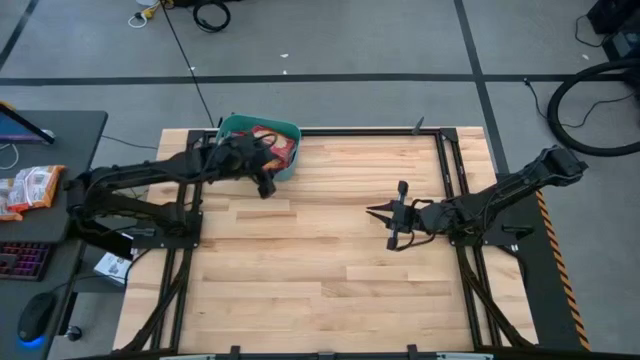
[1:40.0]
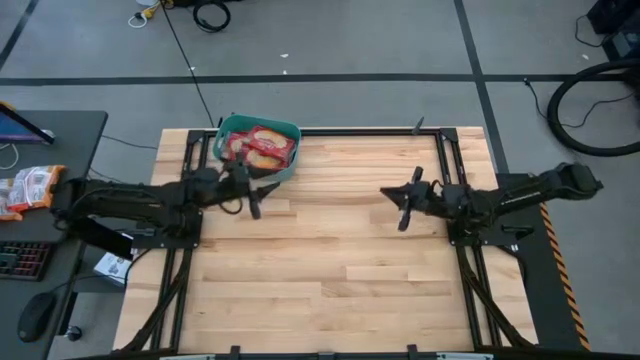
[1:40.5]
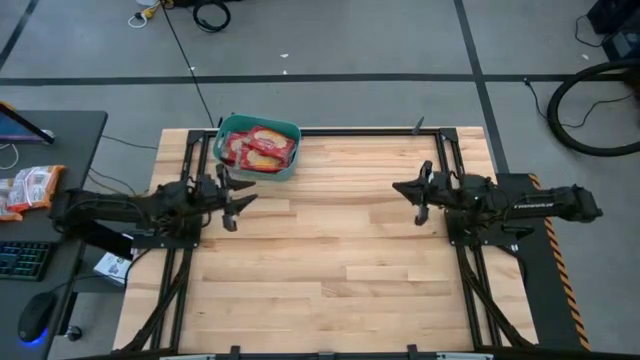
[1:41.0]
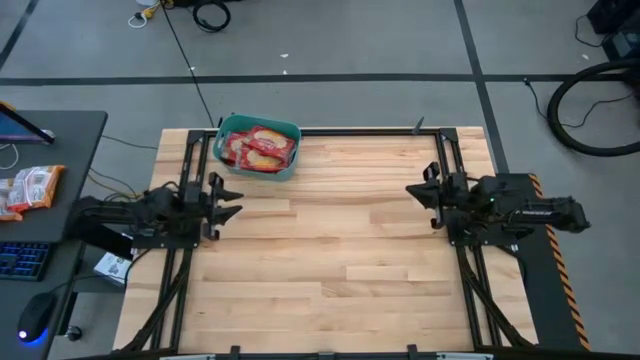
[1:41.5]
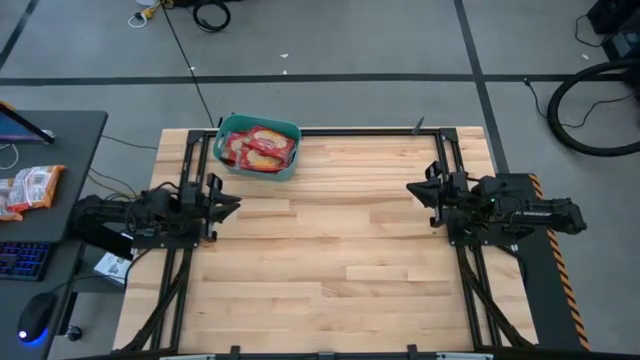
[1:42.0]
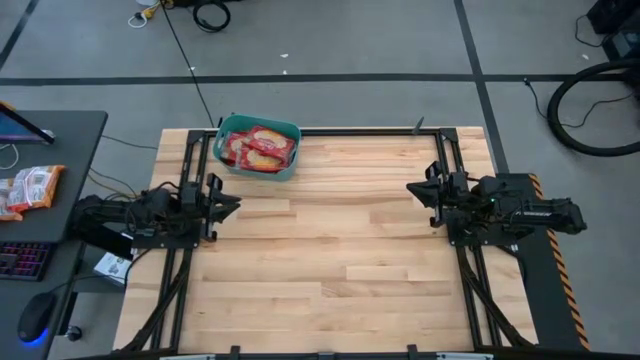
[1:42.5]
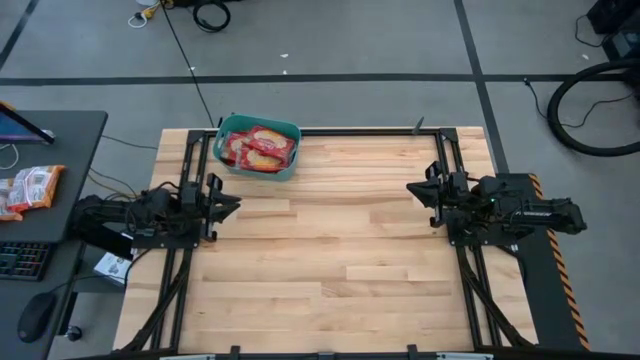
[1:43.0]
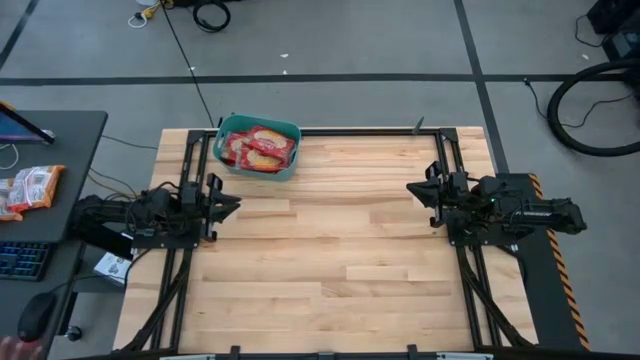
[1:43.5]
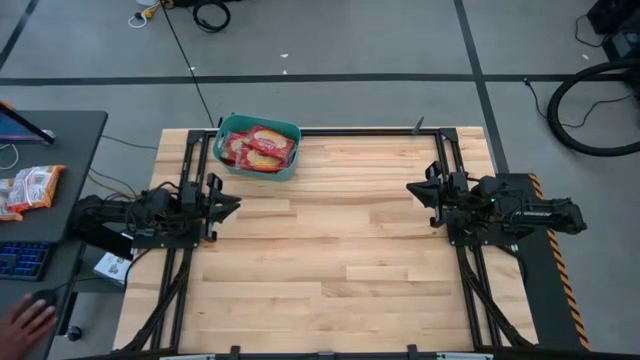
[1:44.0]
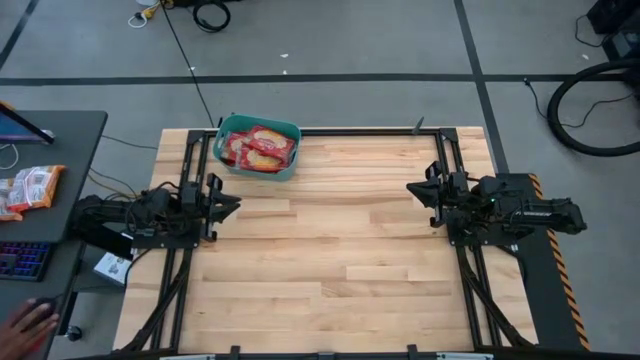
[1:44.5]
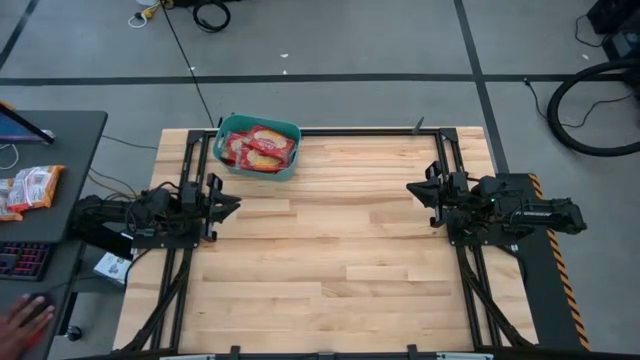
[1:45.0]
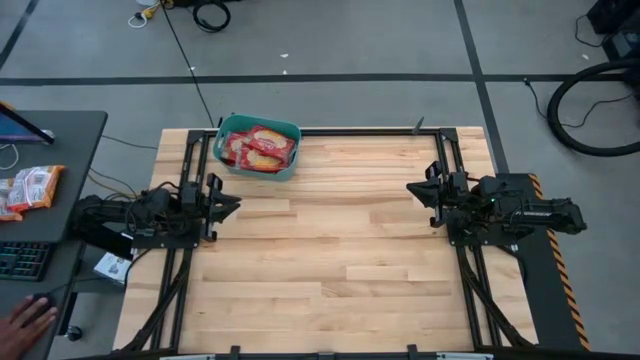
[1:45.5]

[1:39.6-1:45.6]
Task: Sort popcorn bags into baskets
Return to Home Position

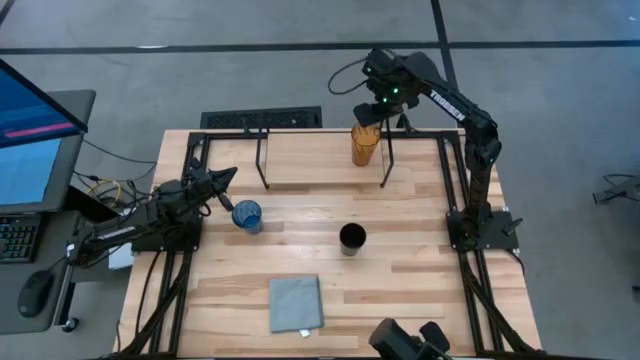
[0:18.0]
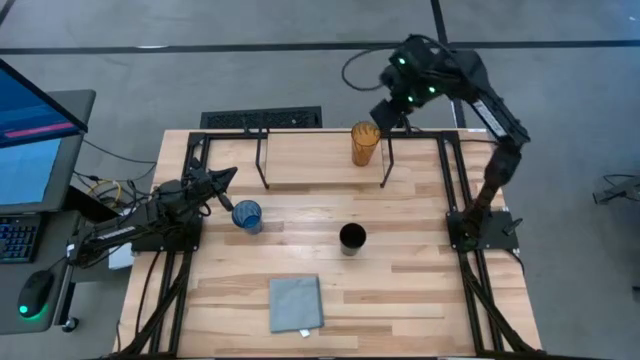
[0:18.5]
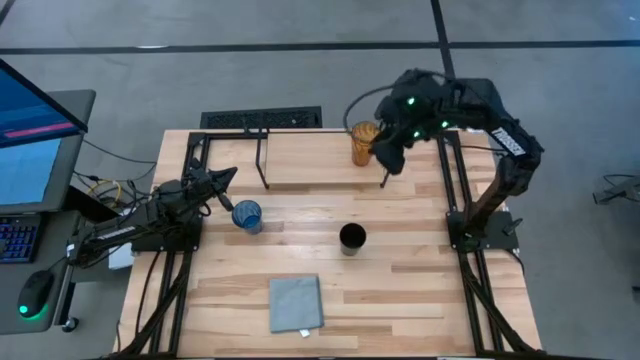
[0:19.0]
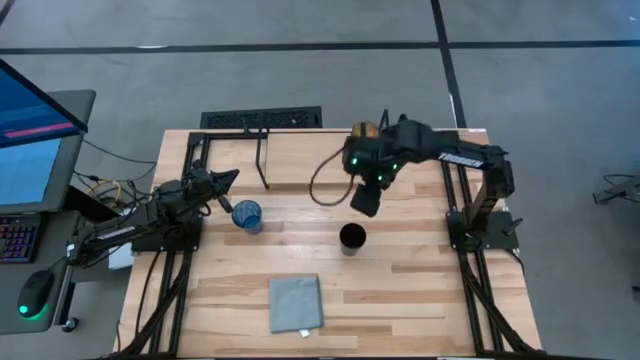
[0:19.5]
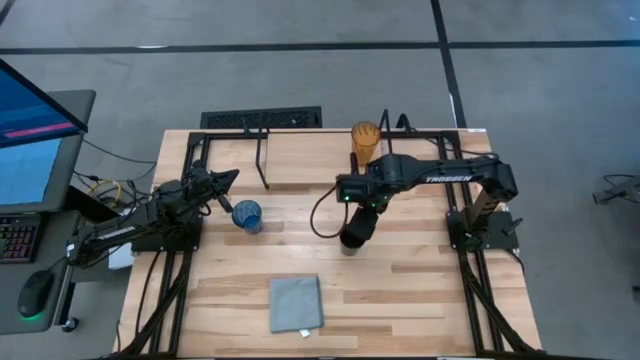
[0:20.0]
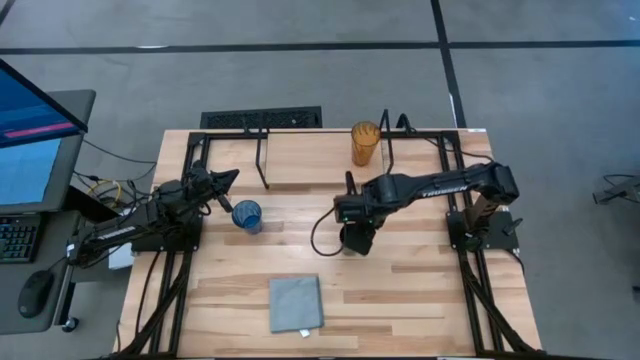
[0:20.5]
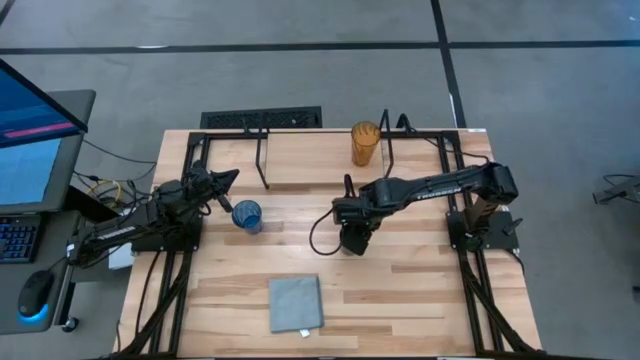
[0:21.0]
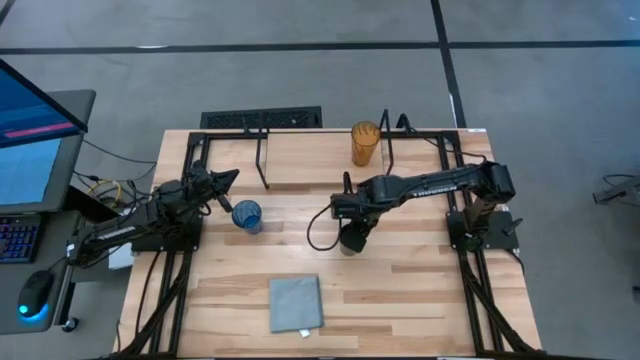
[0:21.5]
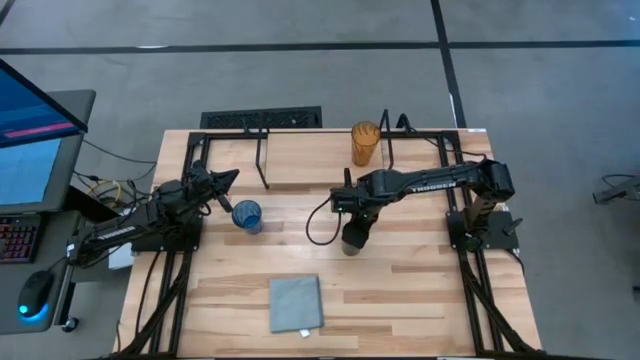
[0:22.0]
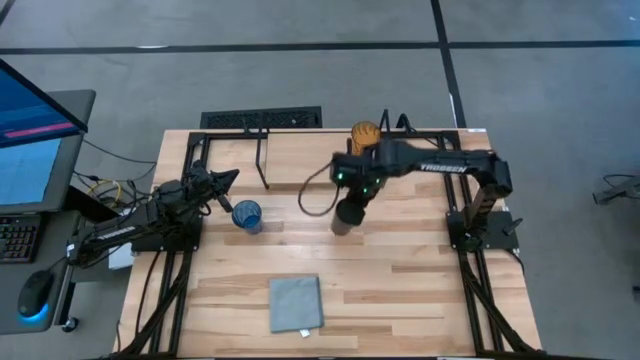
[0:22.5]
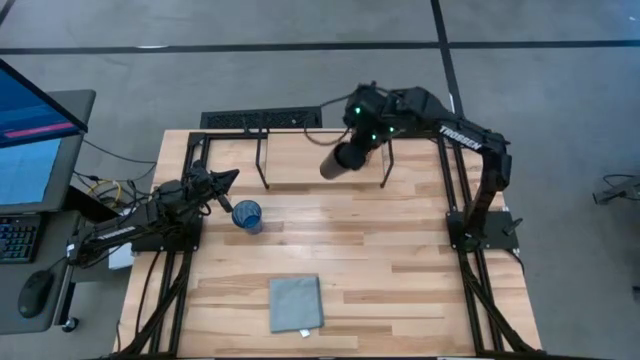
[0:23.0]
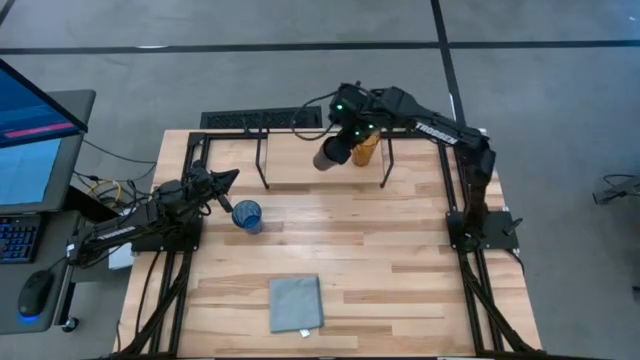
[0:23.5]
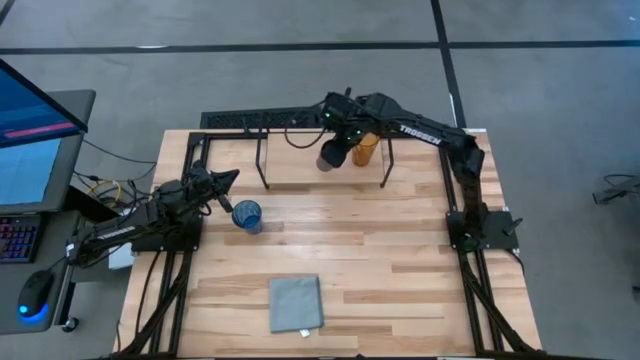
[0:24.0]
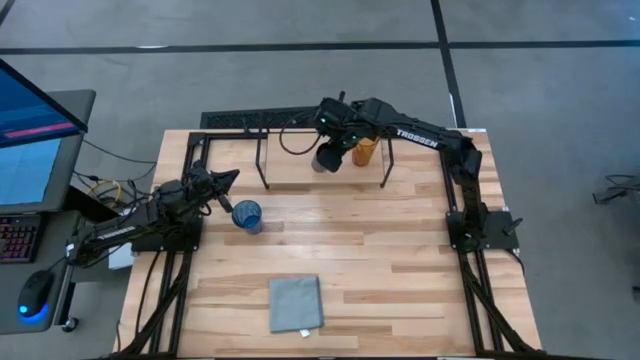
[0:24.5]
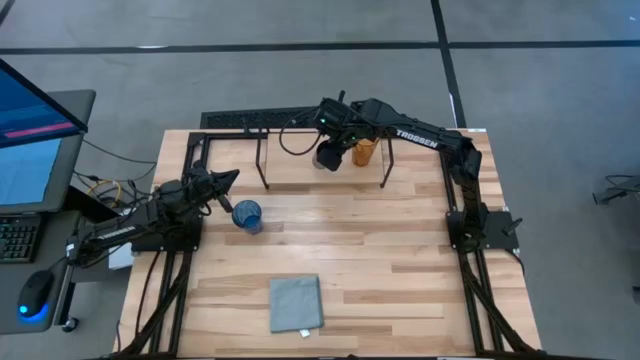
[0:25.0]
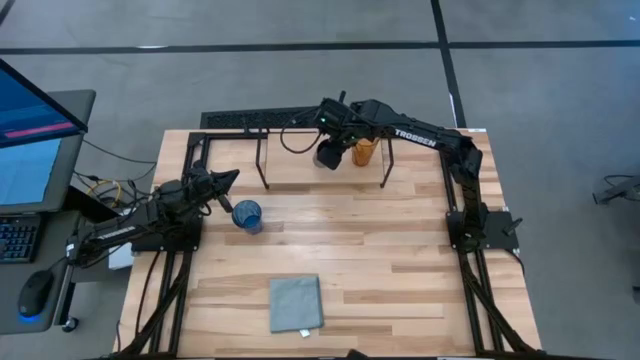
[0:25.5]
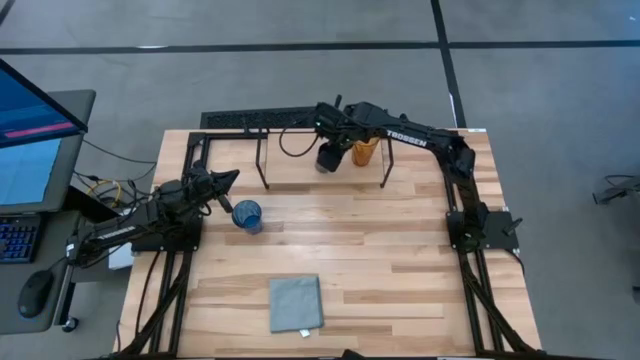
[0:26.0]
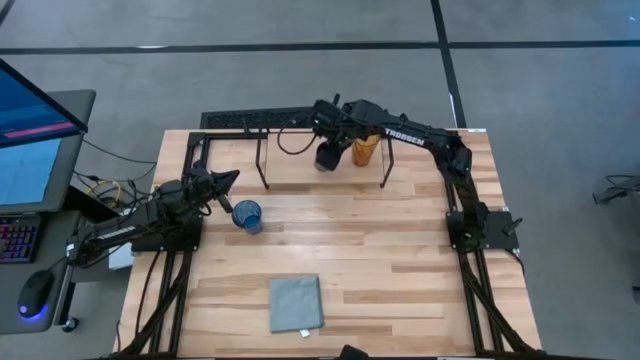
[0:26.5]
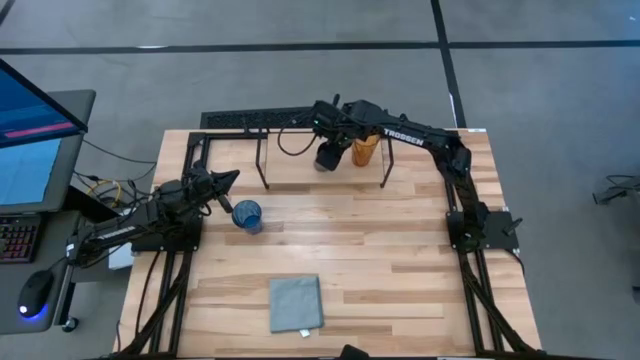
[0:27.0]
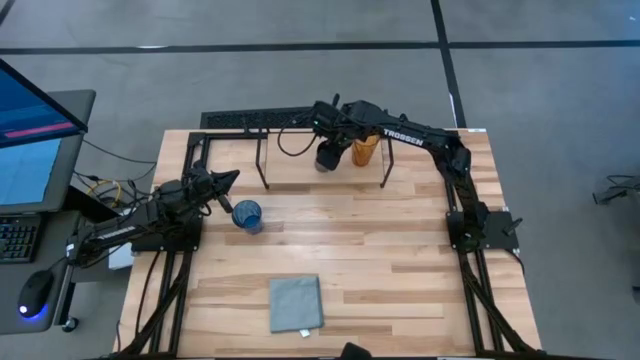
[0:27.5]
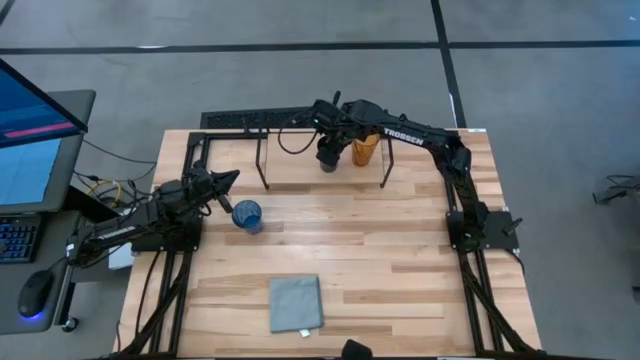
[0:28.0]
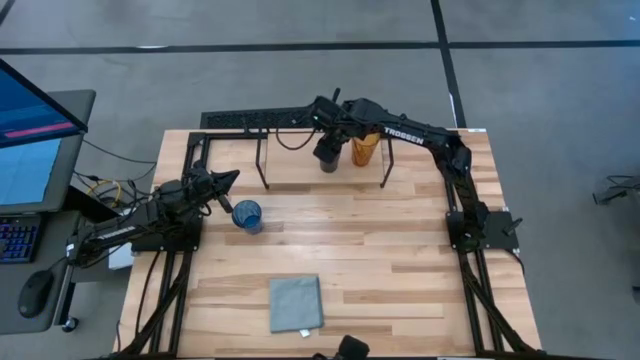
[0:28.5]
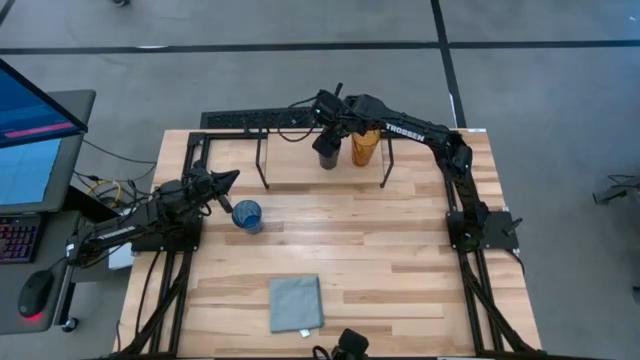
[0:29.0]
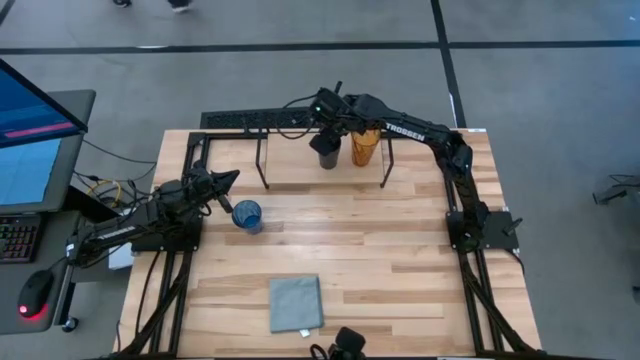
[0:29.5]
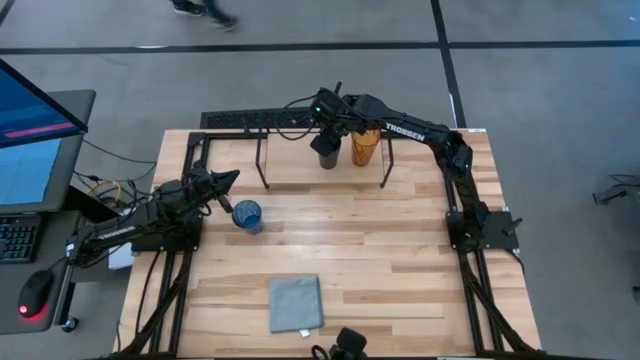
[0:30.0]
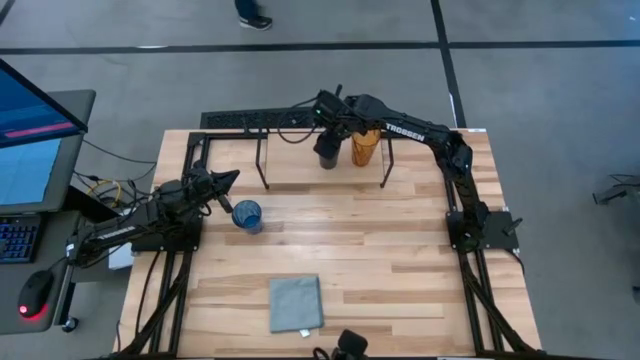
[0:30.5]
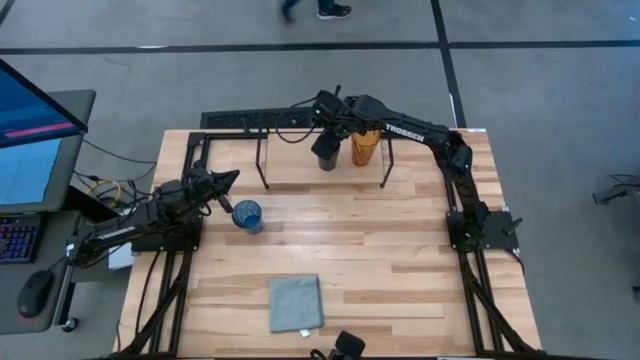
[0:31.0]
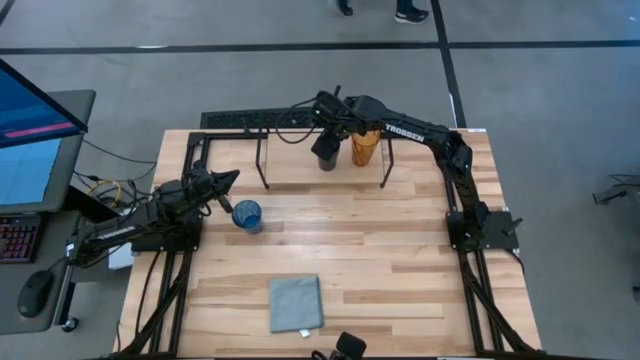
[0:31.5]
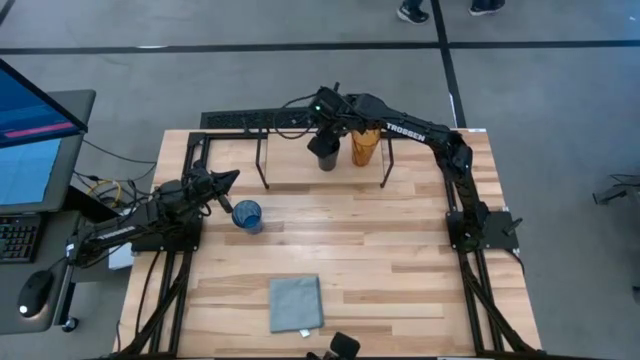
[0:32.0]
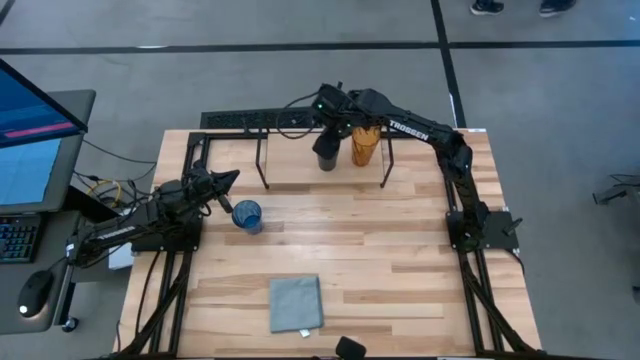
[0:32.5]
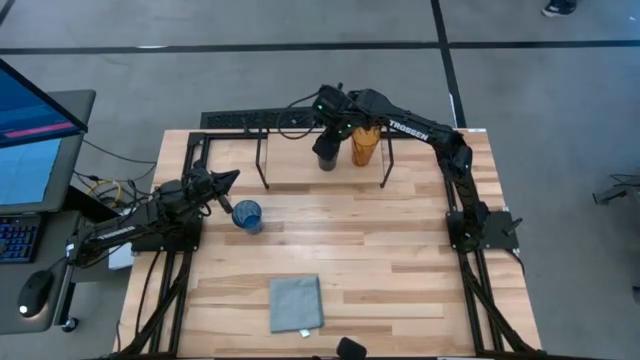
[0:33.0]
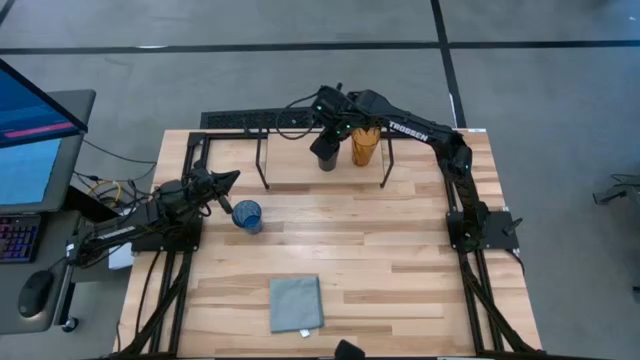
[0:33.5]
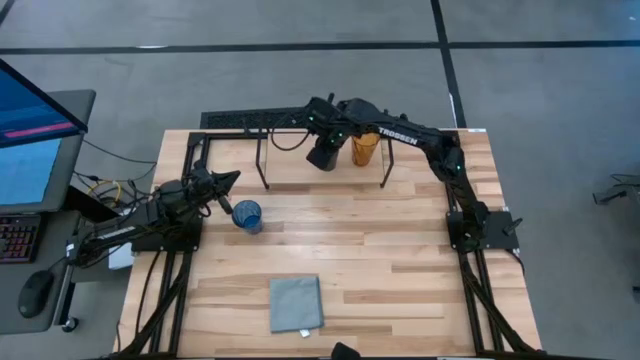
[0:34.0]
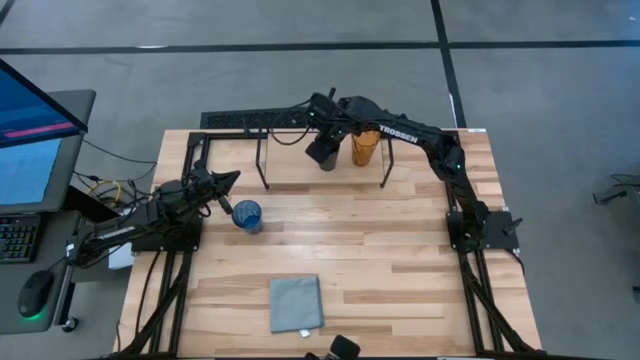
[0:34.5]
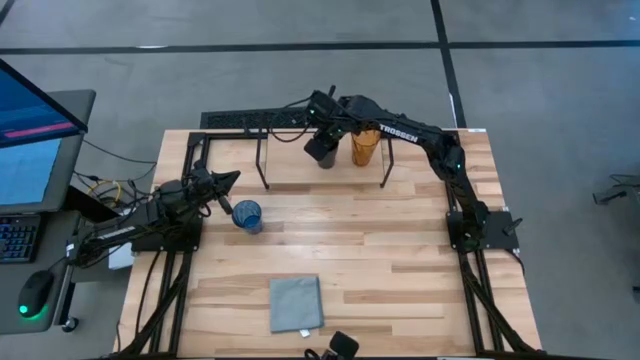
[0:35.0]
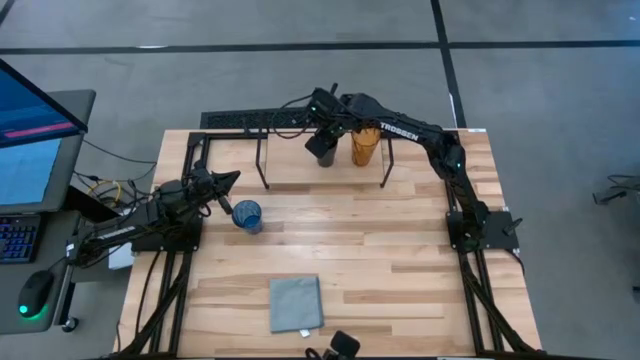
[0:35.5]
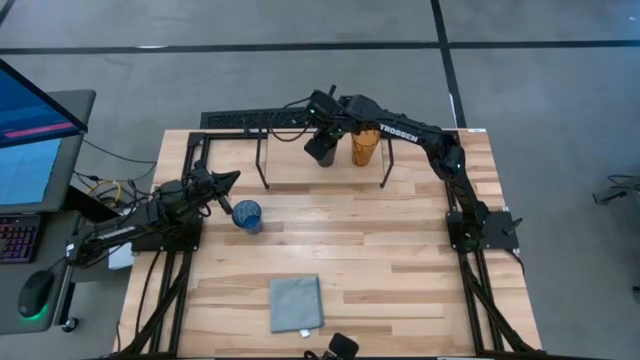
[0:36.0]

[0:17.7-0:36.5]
Task: Stack small to large cups/mugs on shelf
Put the black cup on the shelf
